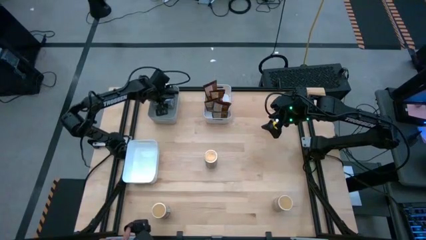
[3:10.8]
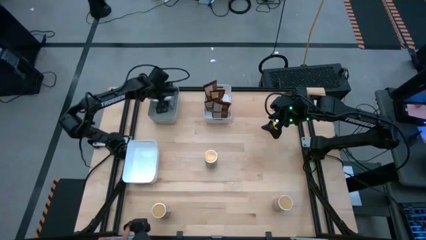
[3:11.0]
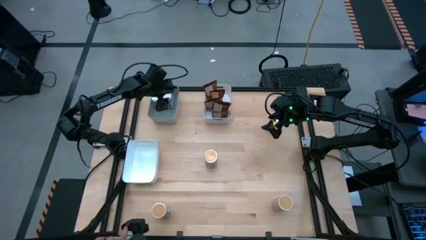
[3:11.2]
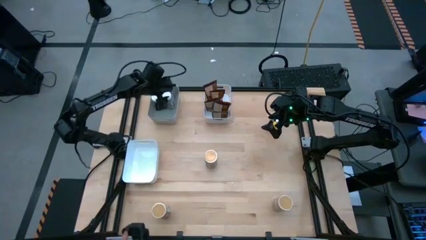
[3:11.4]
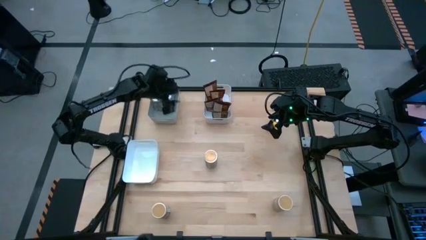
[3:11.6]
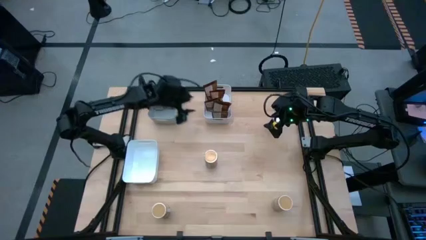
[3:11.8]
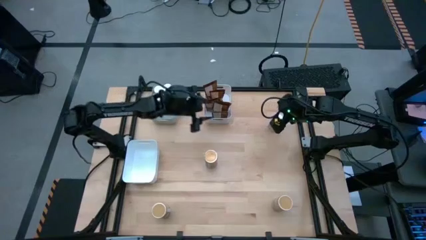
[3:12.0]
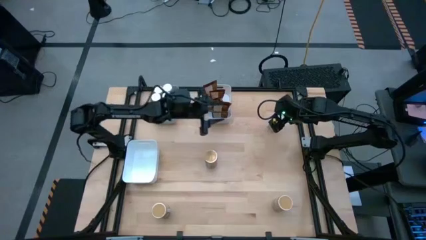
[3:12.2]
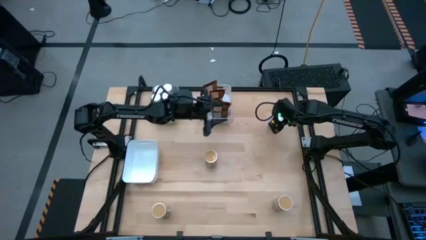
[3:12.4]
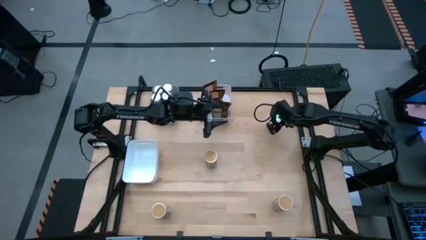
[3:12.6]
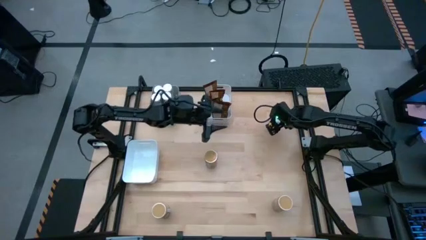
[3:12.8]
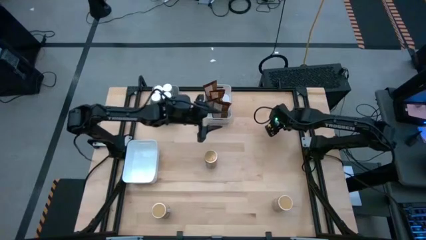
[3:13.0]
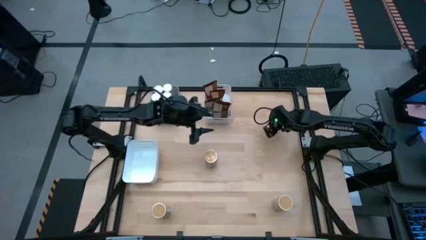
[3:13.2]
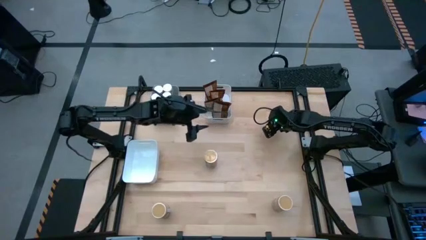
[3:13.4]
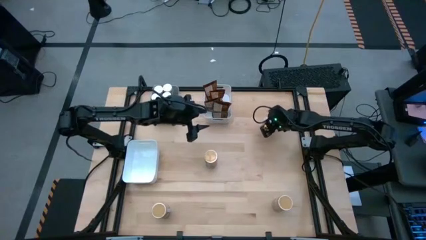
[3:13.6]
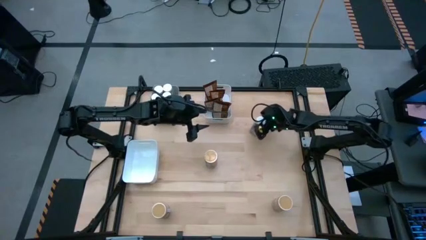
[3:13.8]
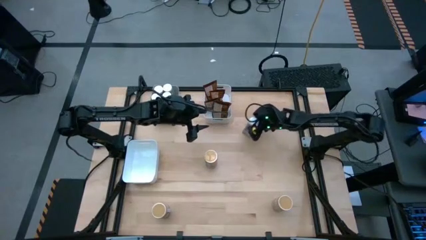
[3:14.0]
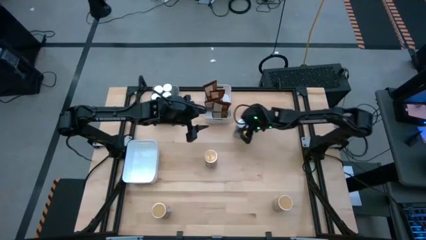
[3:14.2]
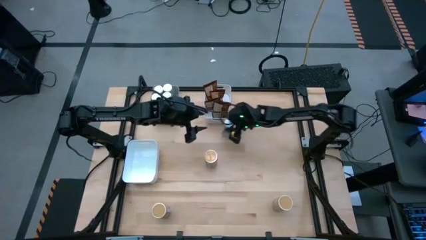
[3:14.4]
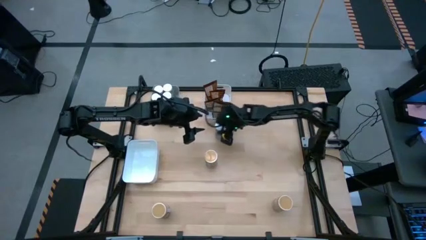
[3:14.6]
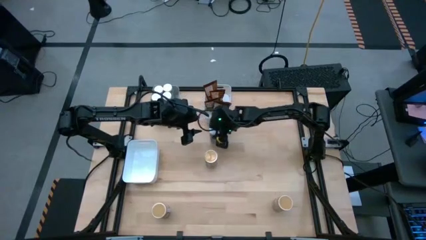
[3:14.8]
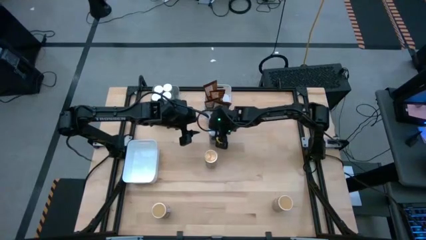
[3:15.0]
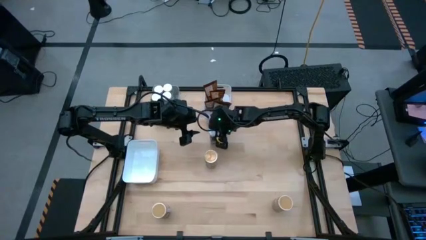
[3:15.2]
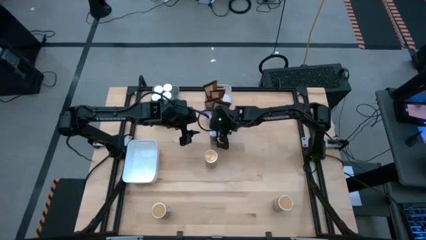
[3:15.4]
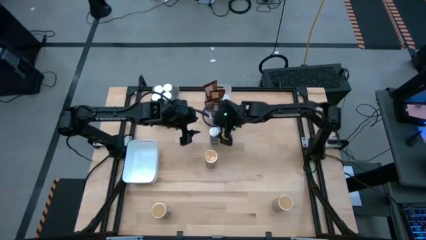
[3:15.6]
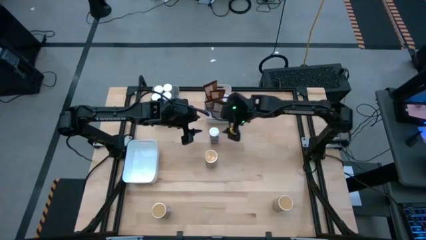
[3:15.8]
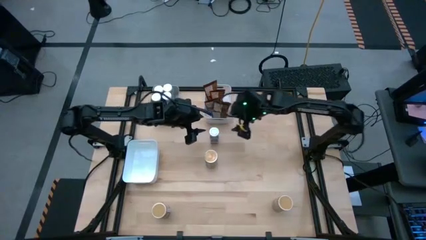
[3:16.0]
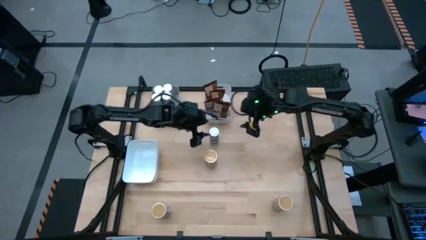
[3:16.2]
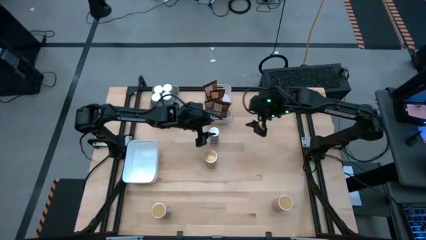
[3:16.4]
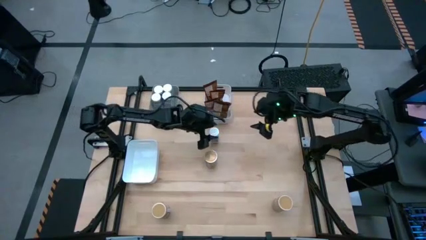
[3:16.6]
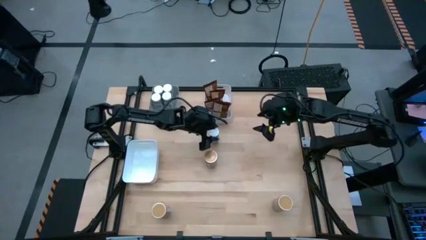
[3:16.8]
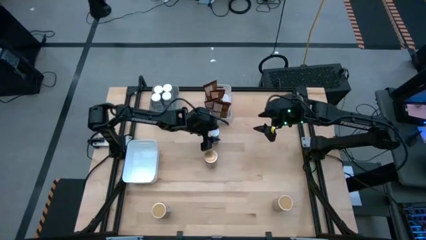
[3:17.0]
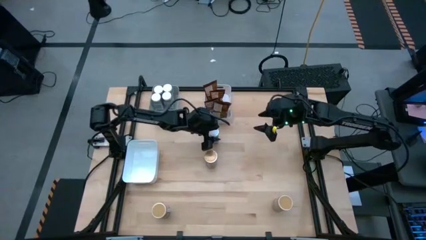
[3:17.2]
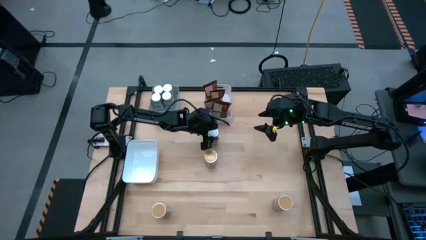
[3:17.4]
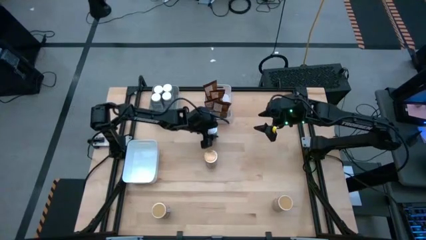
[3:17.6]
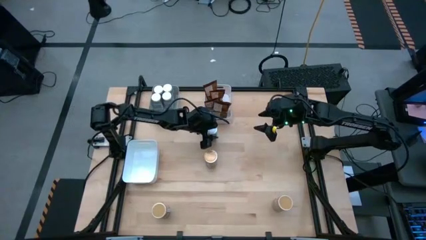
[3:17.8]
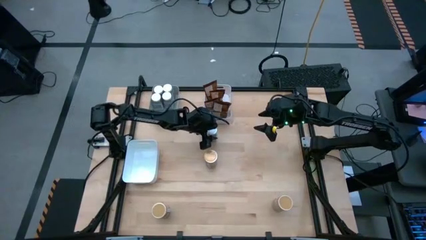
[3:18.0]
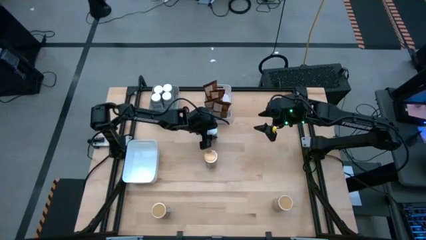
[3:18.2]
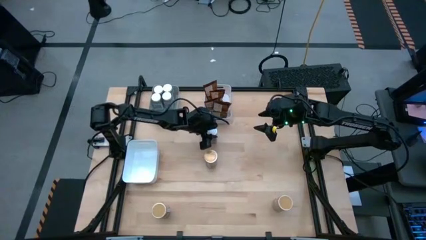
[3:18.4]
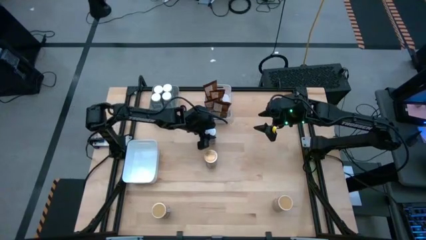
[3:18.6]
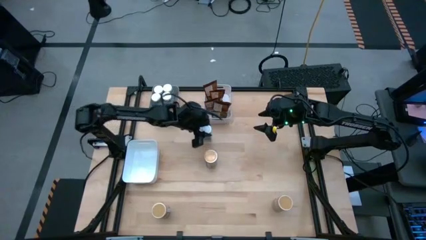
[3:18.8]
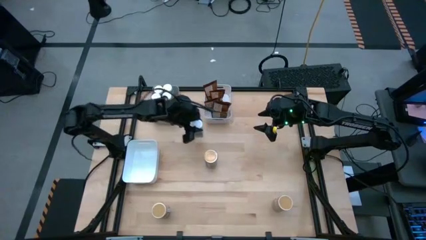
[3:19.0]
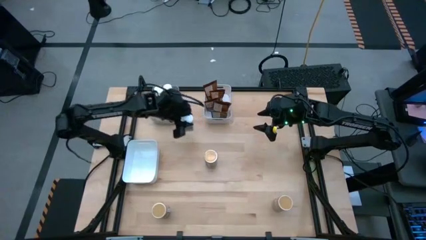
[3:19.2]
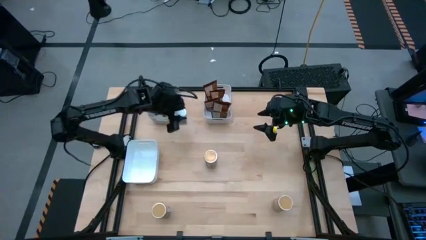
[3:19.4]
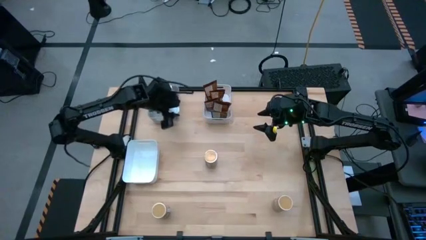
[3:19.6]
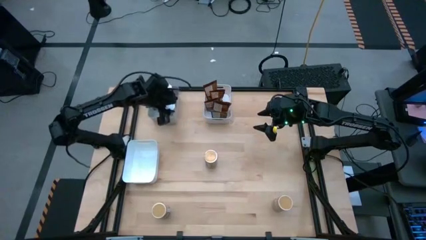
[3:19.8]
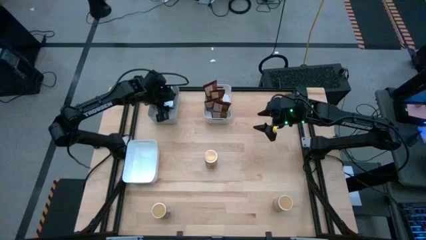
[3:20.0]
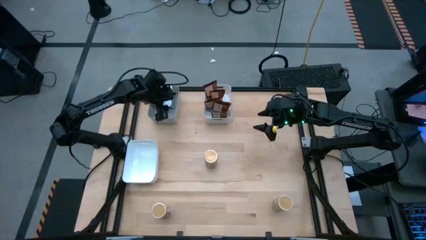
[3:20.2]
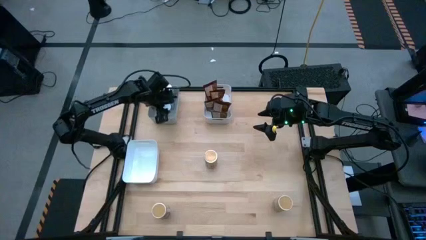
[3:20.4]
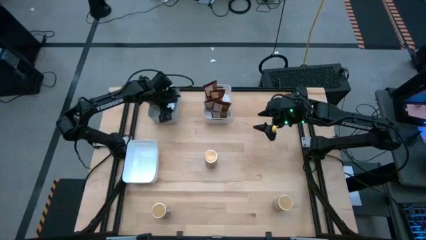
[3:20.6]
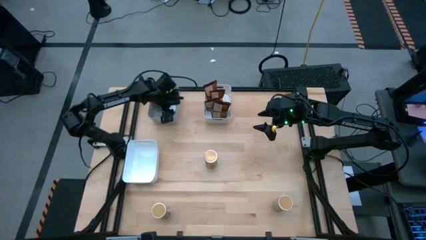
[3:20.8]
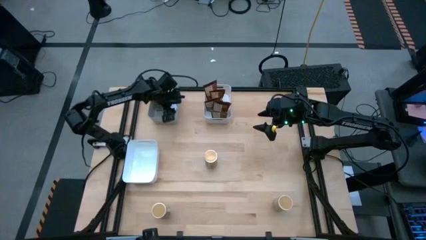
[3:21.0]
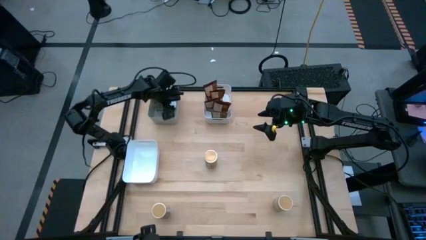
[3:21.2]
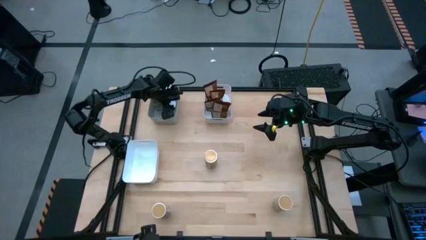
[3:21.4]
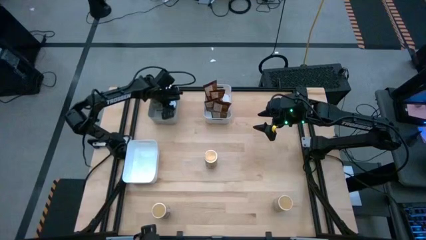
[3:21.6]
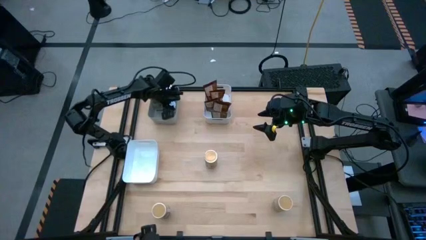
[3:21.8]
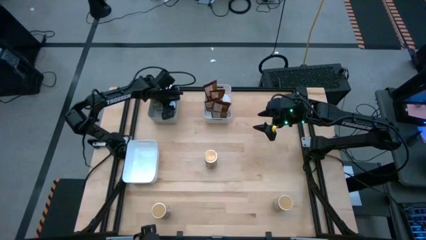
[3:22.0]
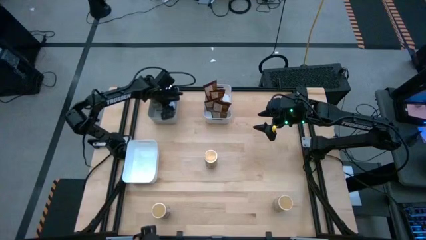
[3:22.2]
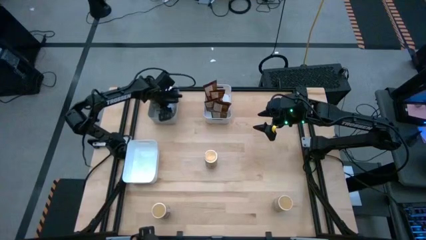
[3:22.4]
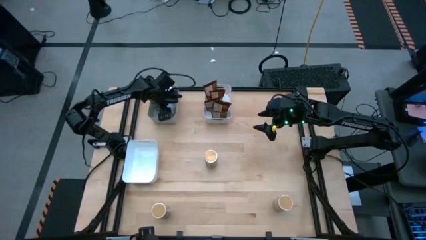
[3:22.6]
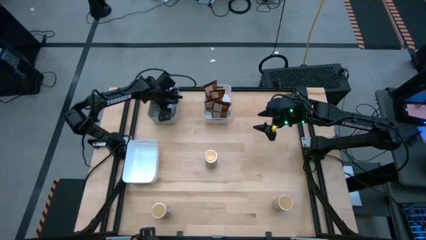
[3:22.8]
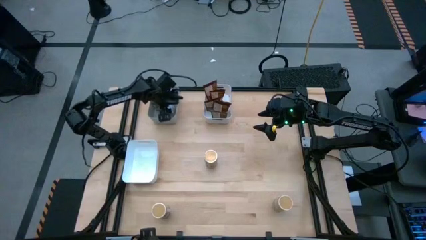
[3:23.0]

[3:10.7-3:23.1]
Task: Sort spices by type
Put the white seasoning bottle into the gray bin

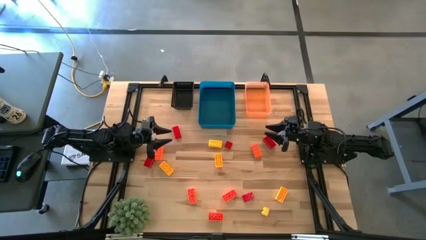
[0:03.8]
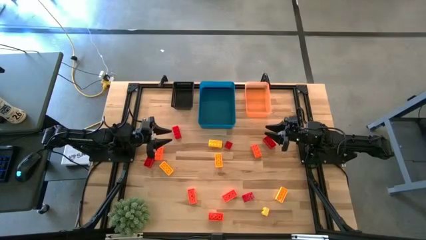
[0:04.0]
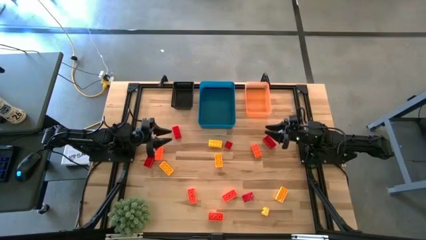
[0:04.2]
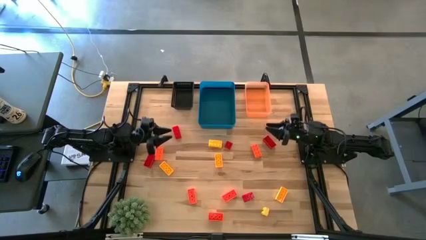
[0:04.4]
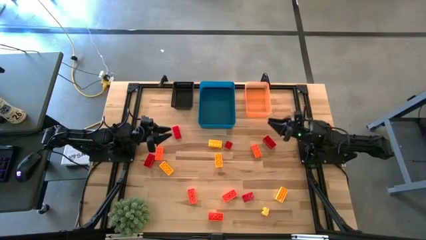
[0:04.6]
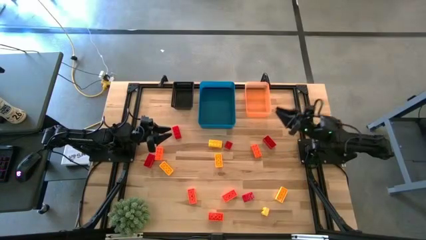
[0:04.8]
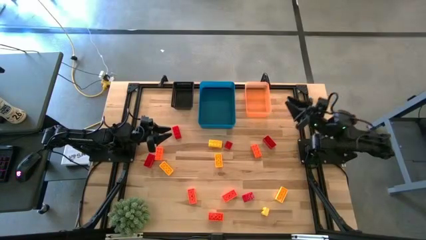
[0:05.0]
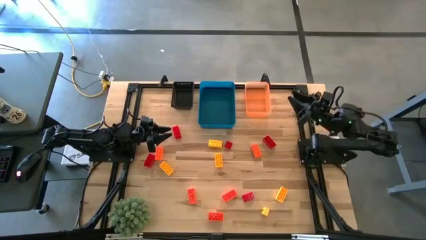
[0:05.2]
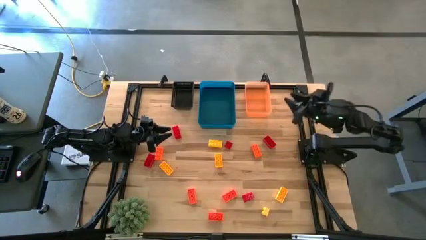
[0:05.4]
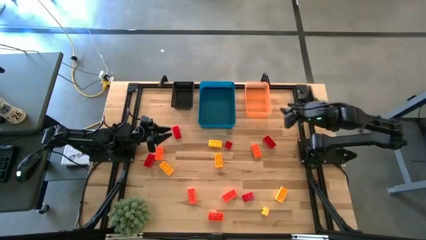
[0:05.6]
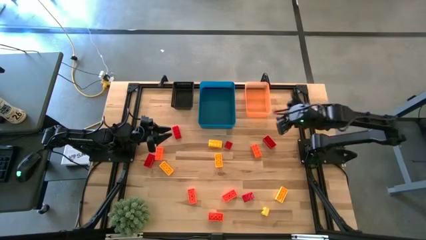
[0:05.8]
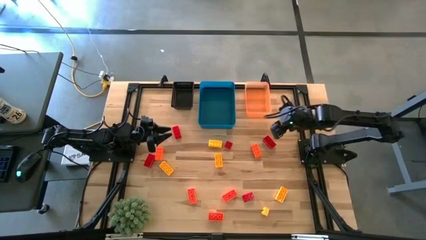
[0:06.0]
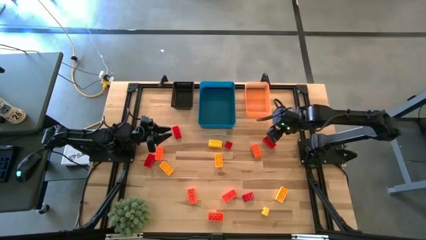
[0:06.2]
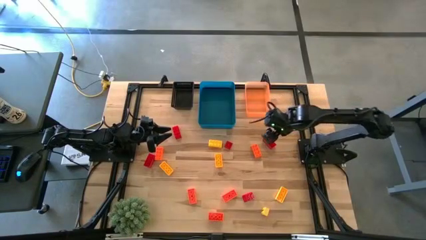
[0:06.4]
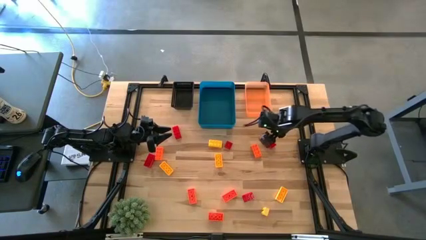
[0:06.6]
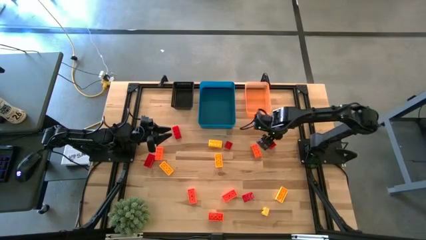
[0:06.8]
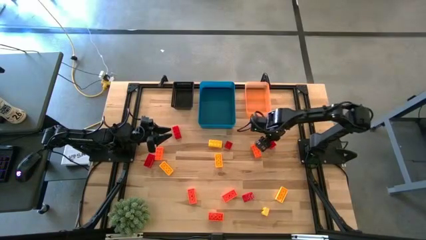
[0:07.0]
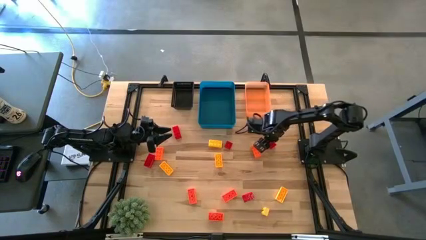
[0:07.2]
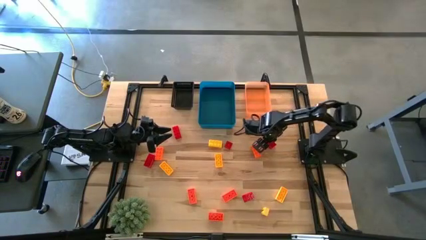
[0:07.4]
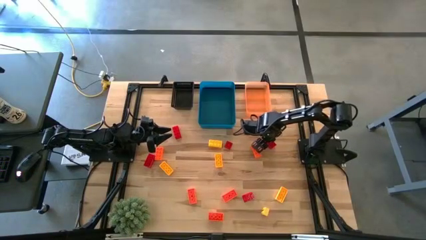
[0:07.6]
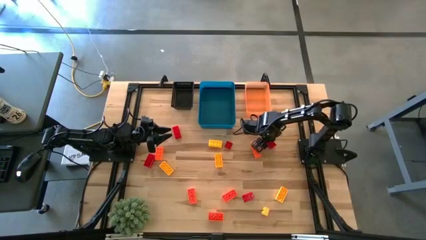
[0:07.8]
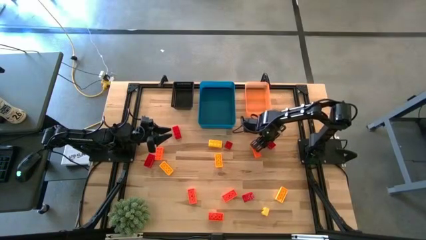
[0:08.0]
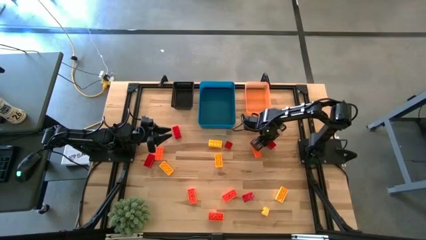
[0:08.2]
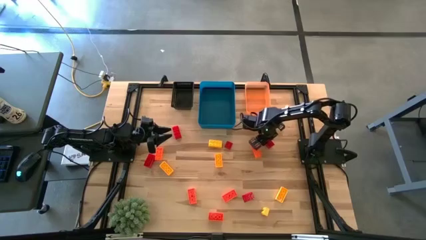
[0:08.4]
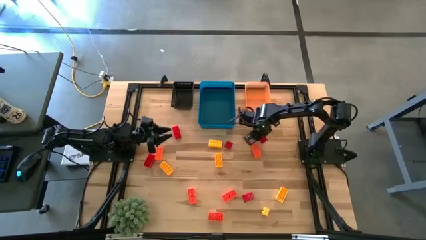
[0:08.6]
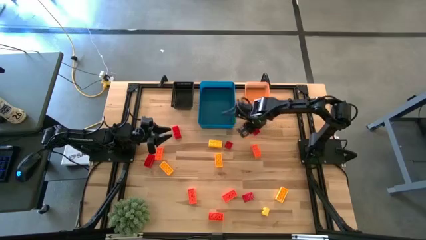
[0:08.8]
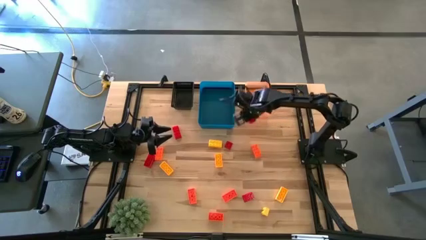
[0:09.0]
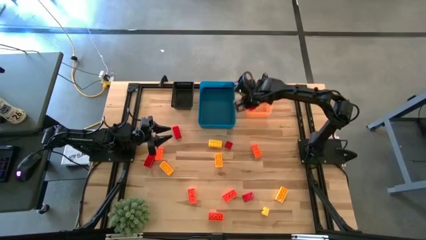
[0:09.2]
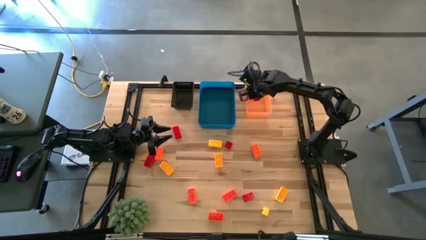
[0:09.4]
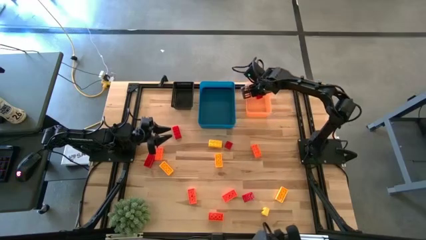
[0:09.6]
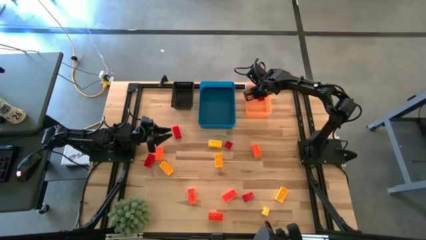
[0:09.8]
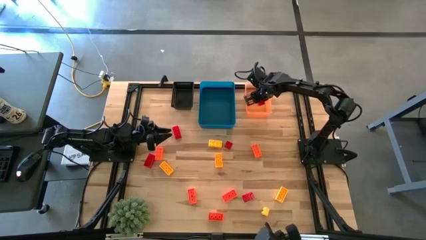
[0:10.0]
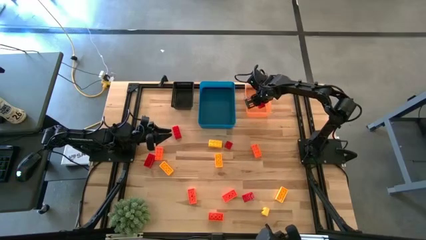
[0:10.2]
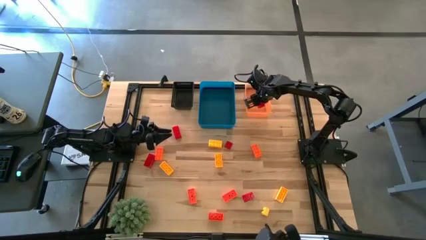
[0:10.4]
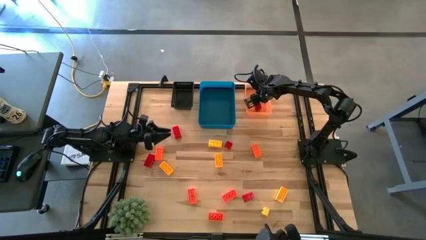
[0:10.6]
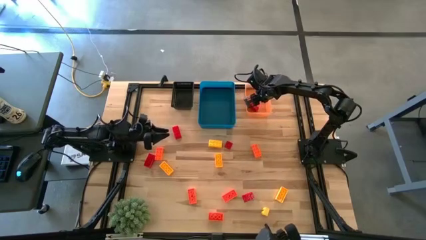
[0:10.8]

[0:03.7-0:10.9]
Task: Sort & place blocks by color
Put the red game piece into the orange bin
